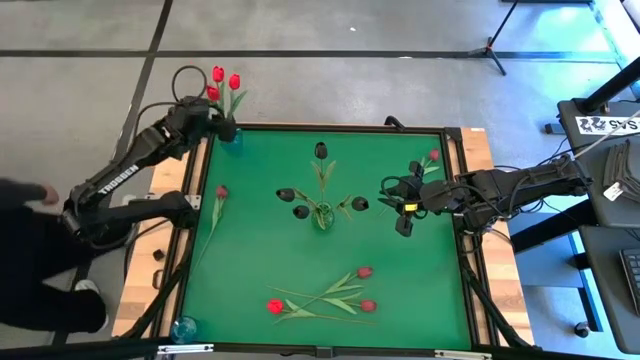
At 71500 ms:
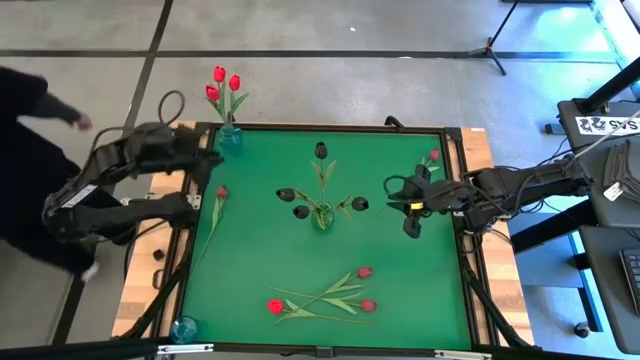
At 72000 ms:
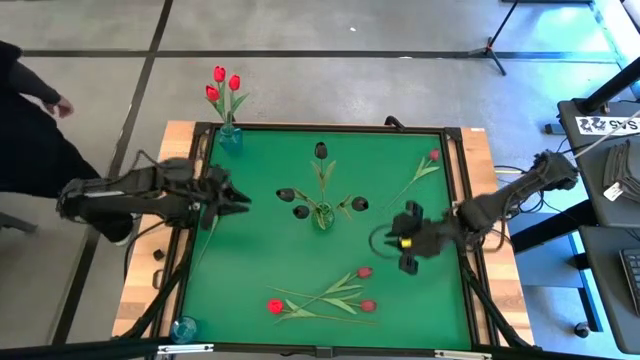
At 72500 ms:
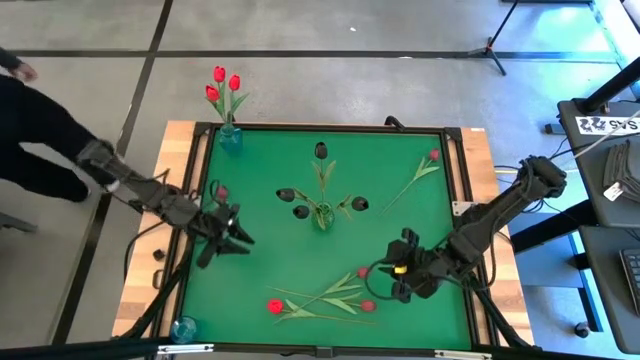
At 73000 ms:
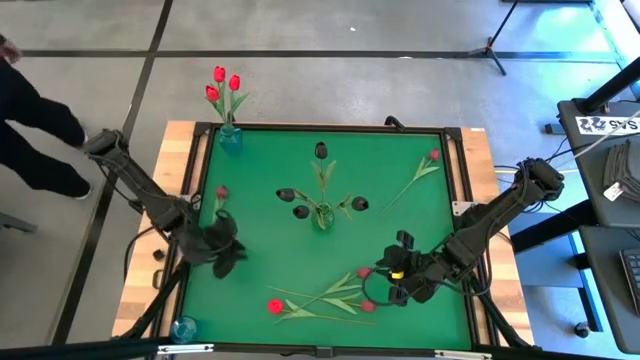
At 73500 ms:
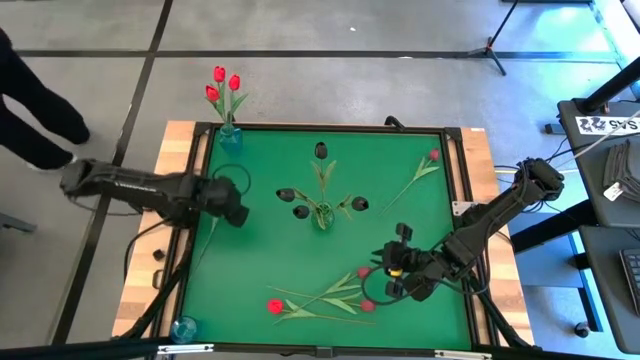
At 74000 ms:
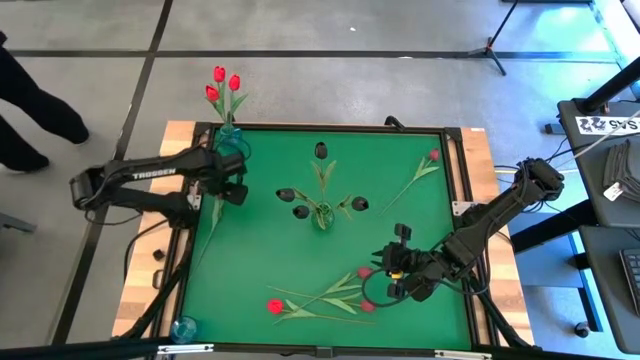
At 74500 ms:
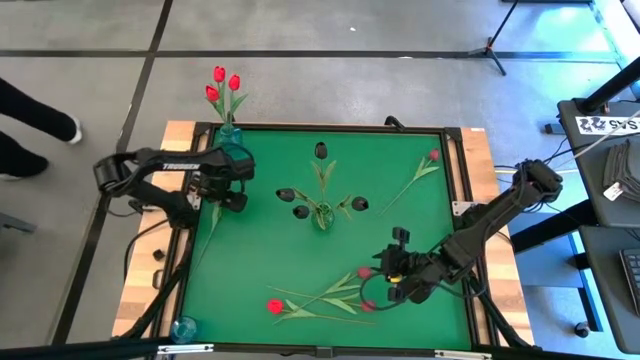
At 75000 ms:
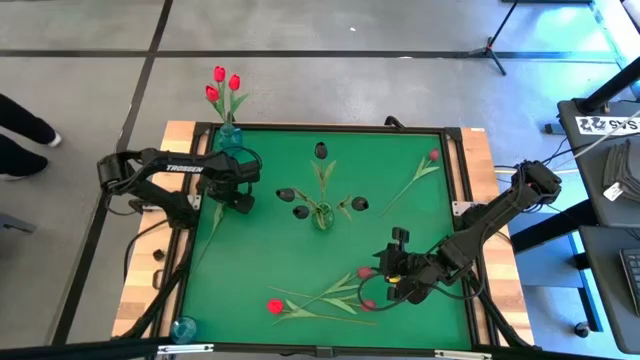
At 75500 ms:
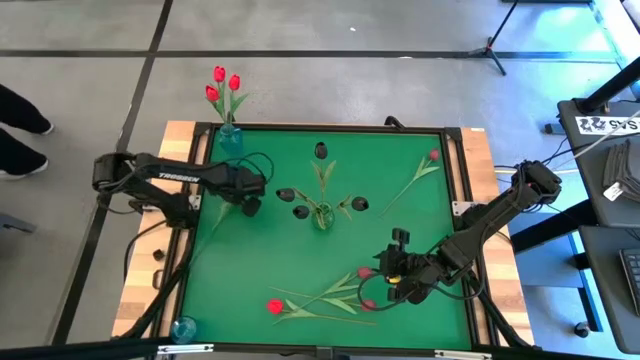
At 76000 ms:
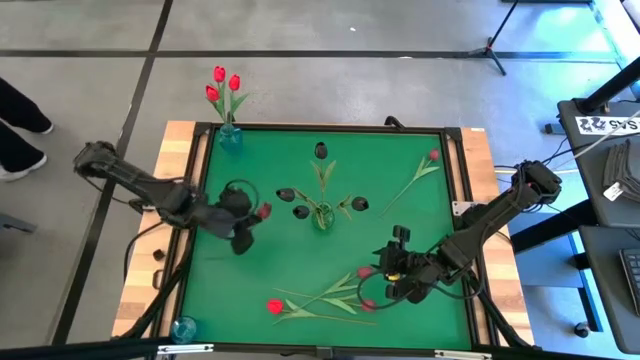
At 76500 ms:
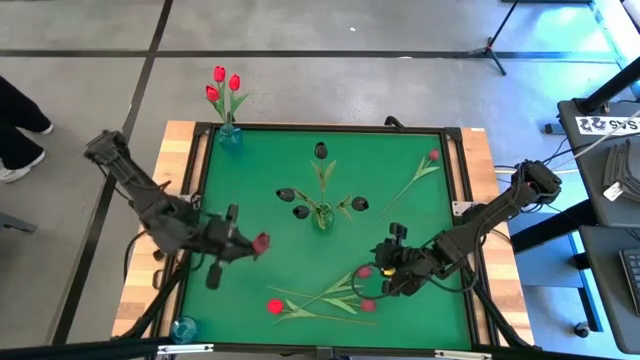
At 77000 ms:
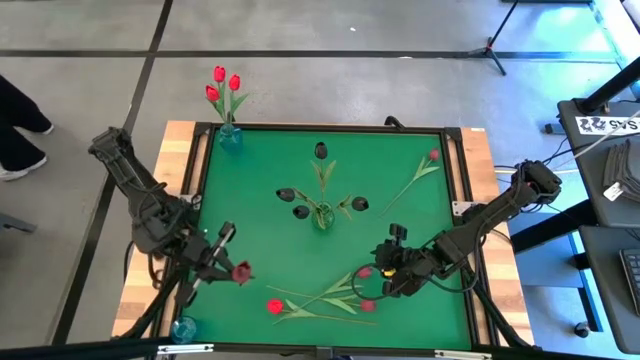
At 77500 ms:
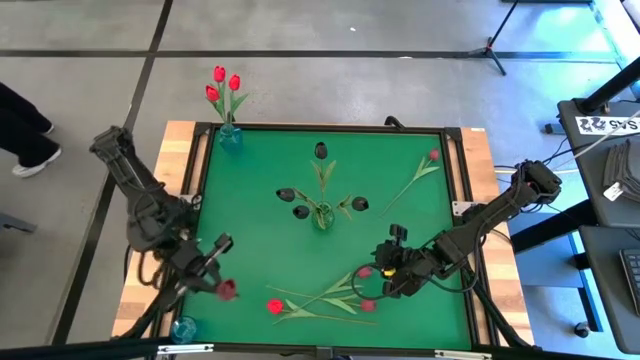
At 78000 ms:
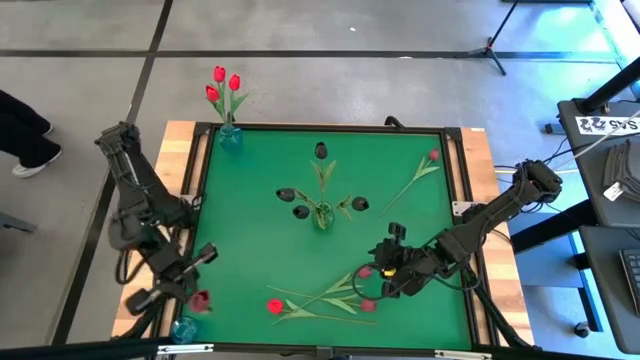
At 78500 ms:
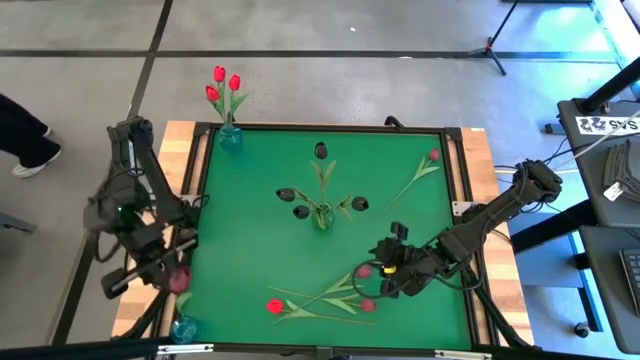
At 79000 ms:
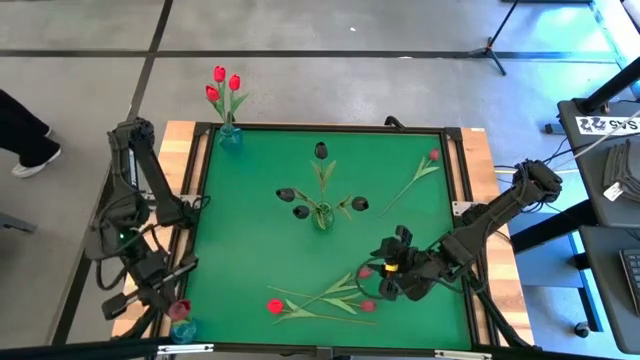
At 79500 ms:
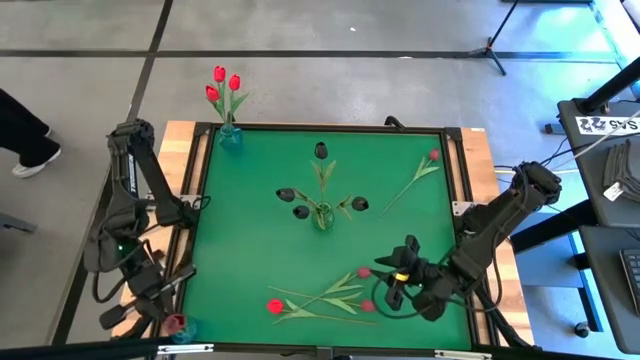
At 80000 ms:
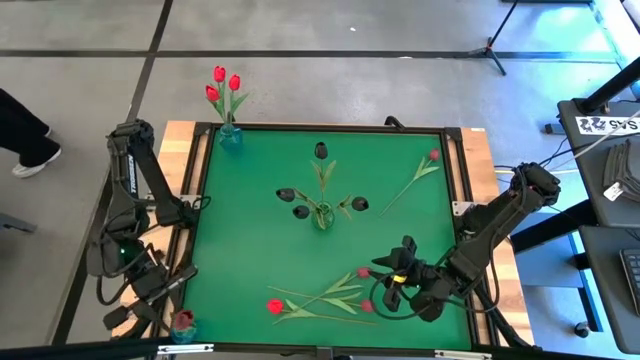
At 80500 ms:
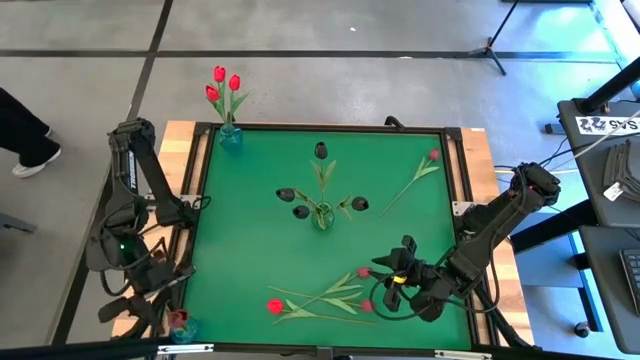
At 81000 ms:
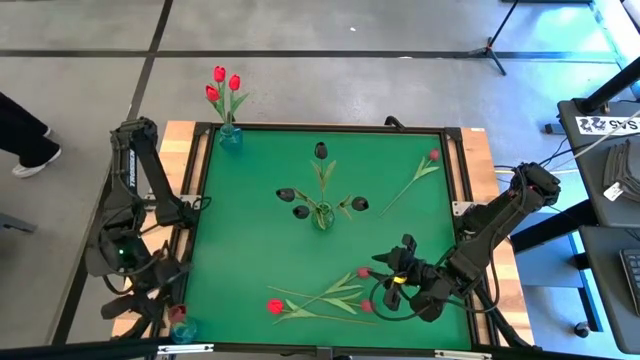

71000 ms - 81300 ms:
Task: Sort flowers into vase by color
Put the dark red tulip into the bottom blue vase

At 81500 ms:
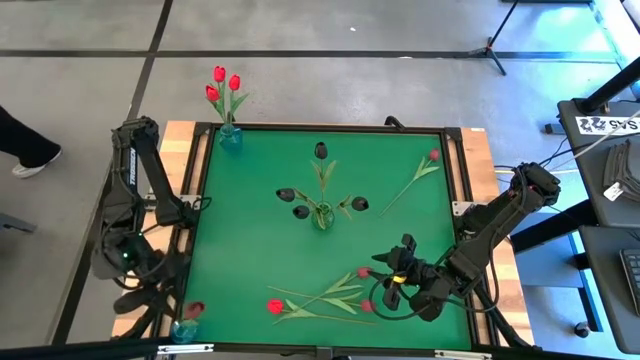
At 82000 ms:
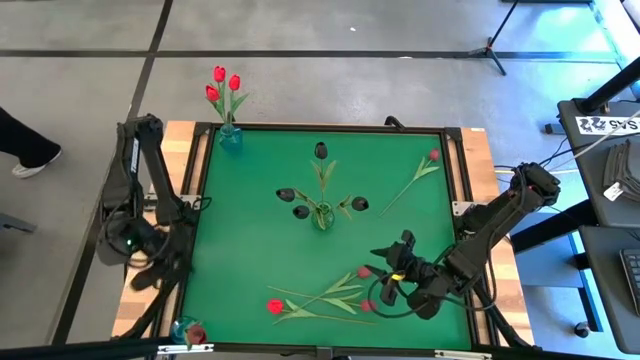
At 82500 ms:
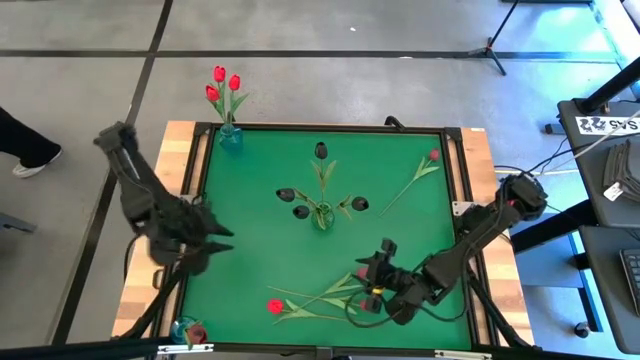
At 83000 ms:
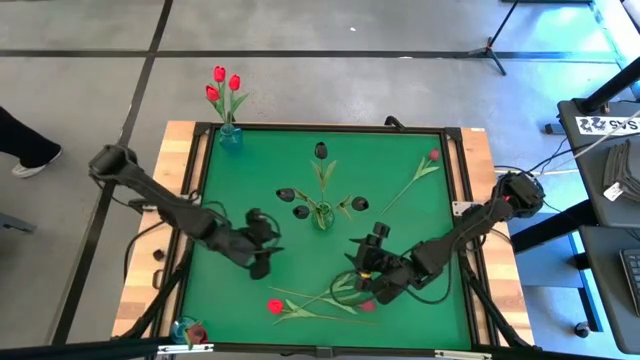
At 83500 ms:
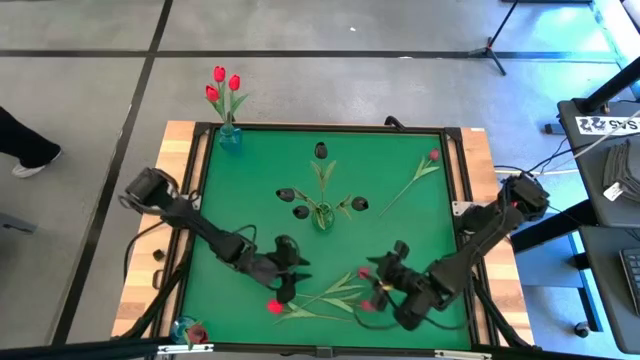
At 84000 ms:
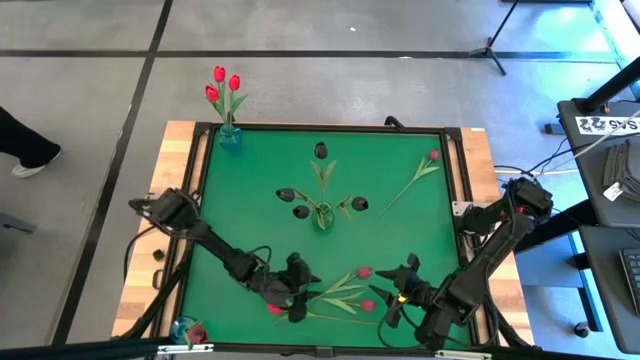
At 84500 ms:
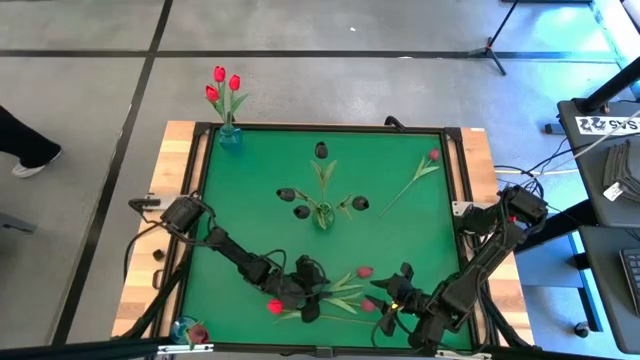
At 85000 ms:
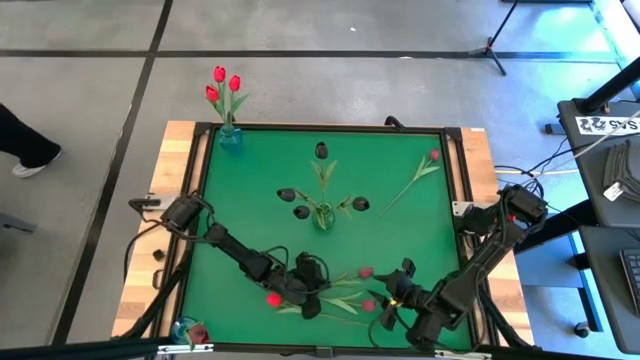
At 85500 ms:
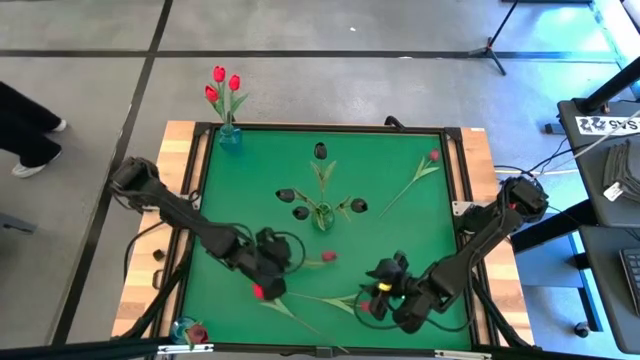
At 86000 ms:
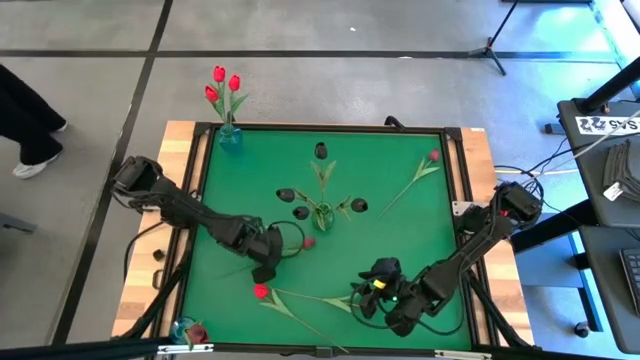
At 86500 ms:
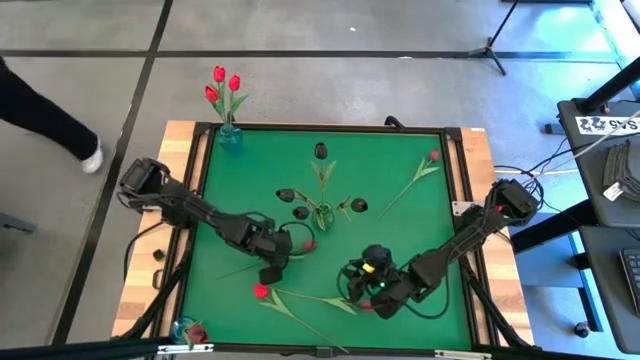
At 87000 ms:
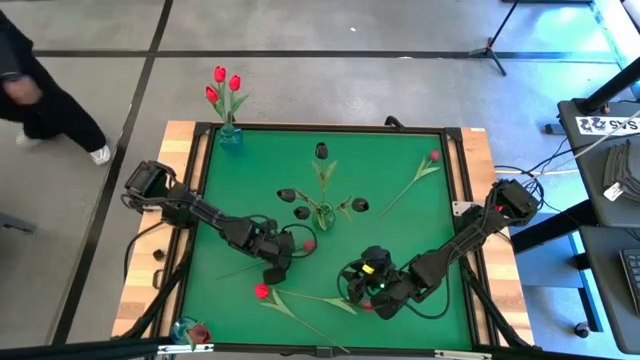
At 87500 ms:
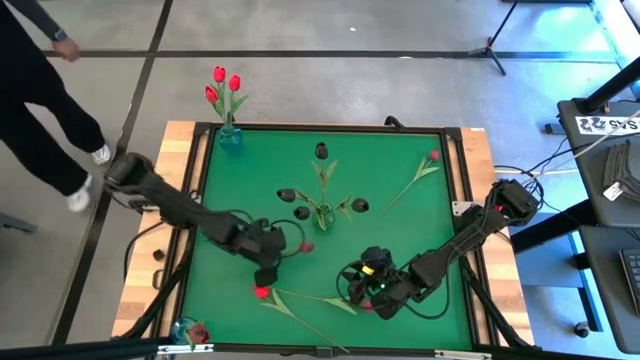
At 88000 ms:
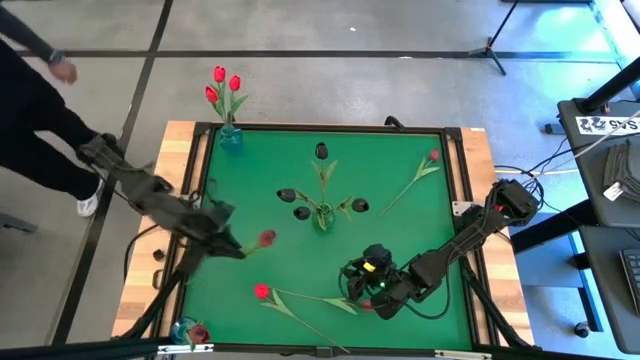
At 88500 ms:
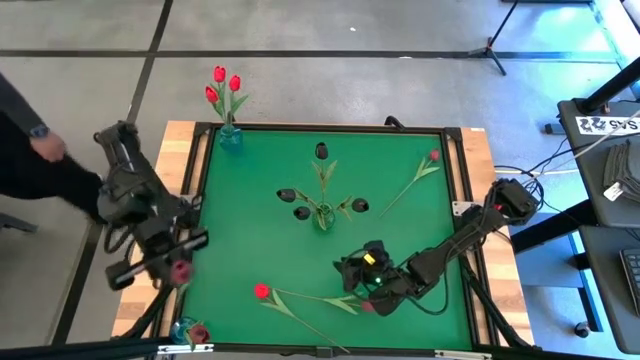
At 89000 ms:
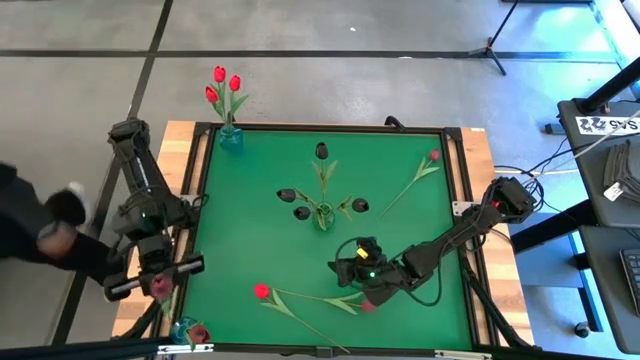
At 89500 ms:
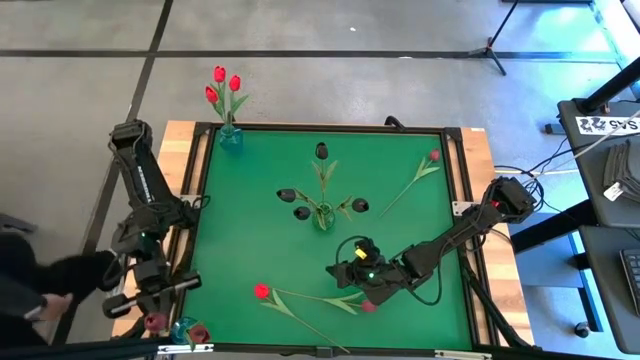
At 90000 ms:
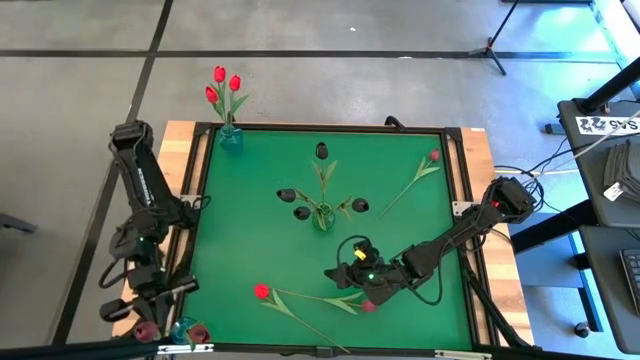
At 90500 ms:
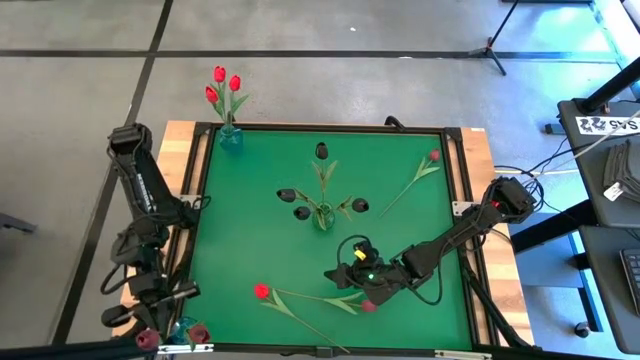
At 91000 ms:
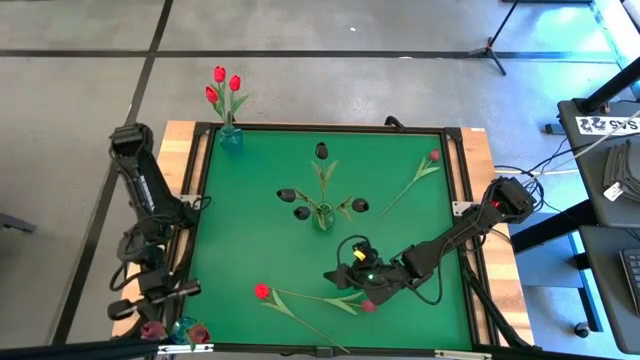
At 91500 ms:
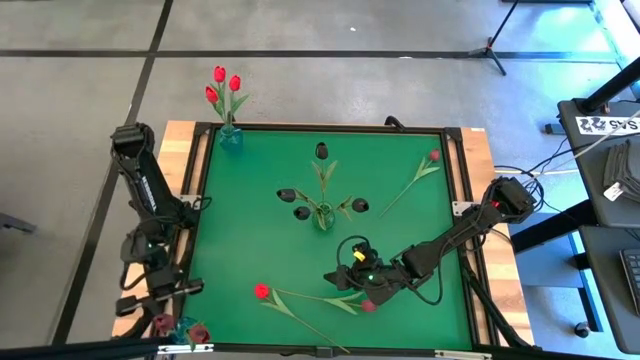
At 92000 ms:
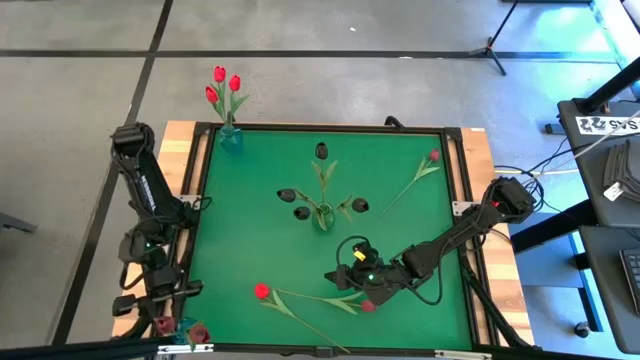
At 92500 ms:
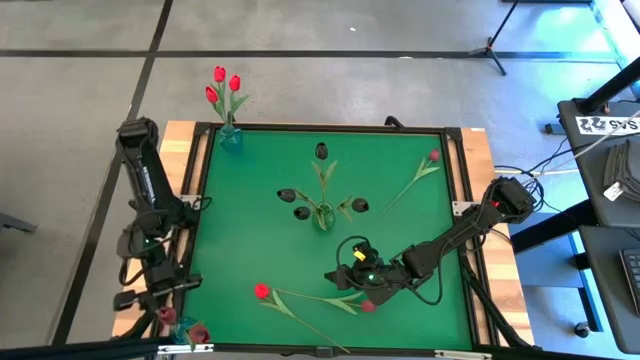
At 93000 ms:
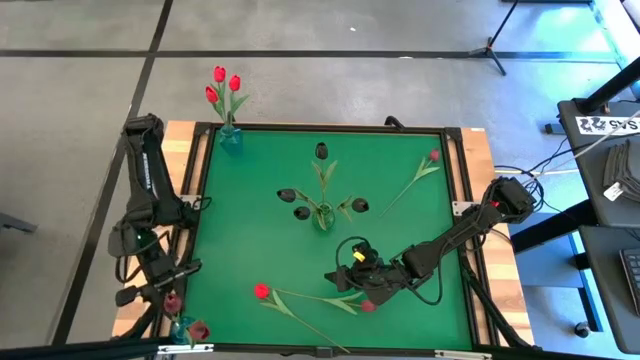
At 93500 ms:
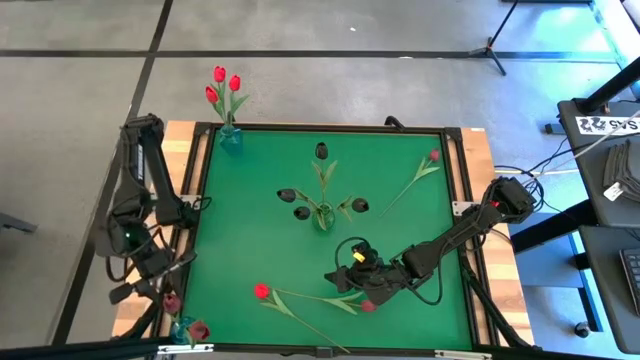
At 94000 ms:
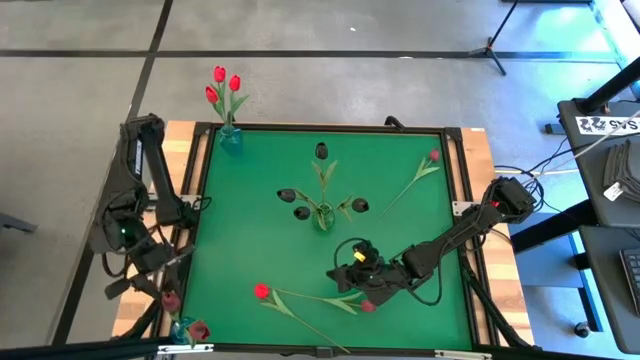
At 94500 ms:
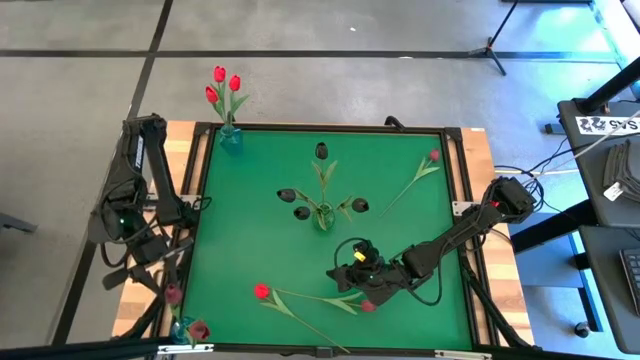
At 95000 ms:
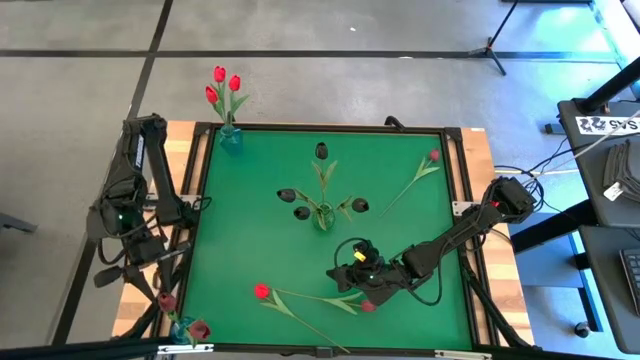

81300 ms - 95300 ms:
Put the dark red tulip into the bottom blue vase
